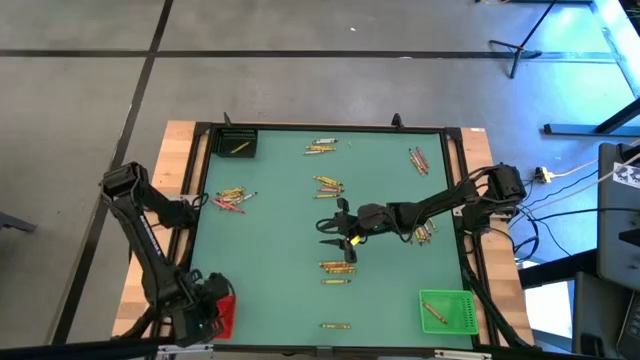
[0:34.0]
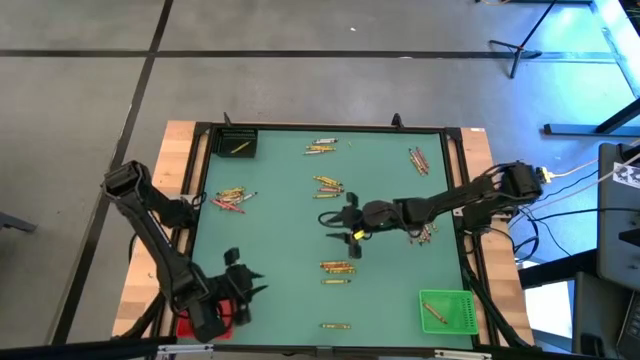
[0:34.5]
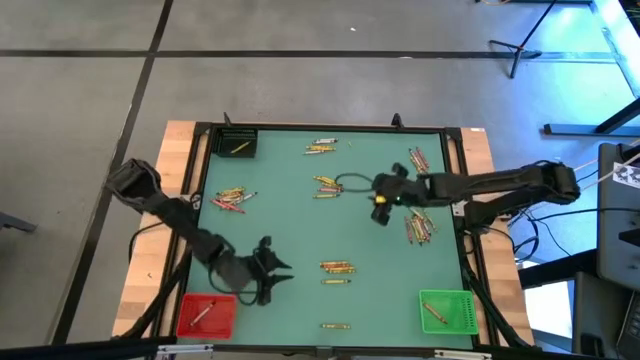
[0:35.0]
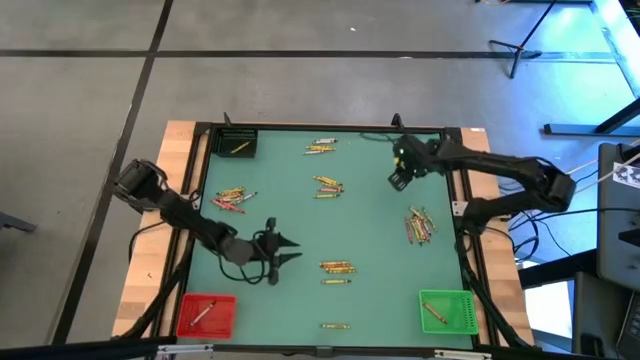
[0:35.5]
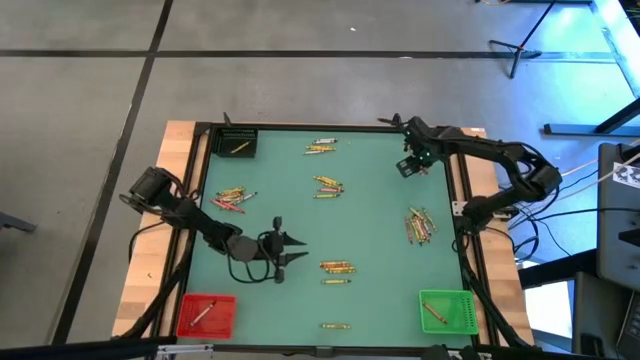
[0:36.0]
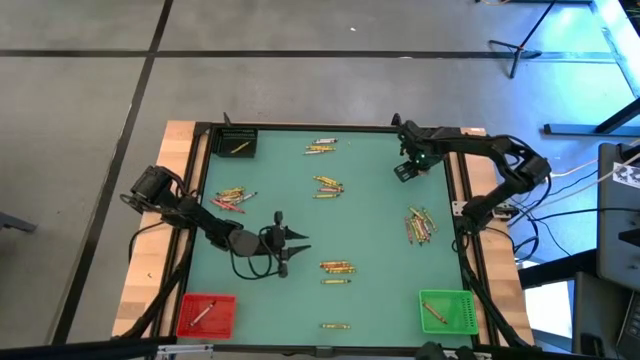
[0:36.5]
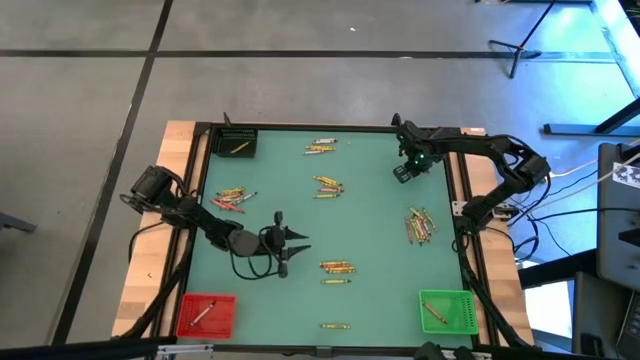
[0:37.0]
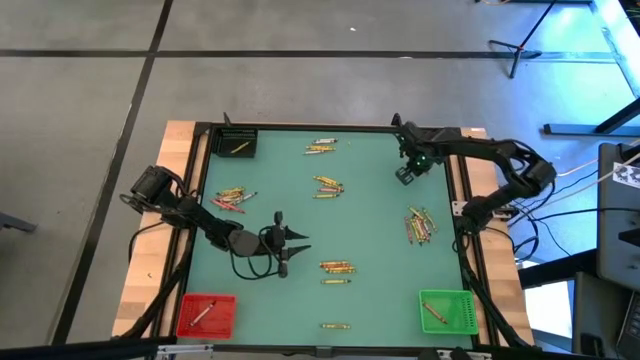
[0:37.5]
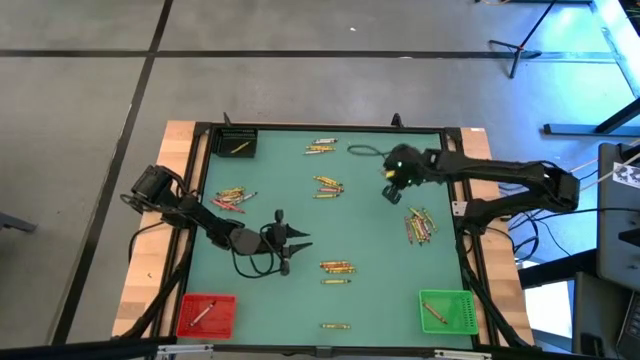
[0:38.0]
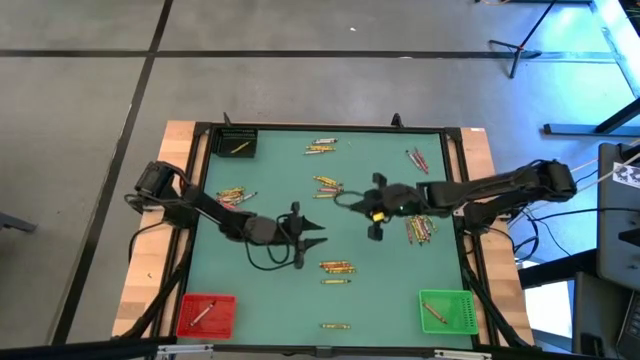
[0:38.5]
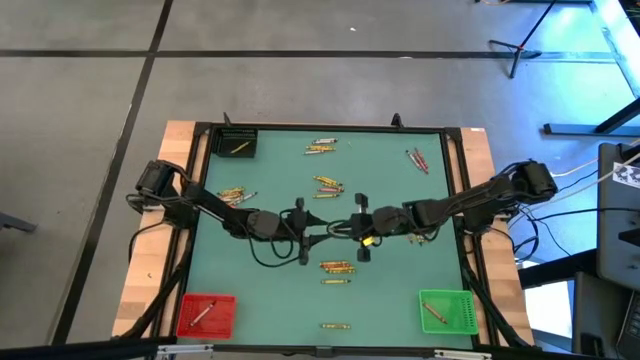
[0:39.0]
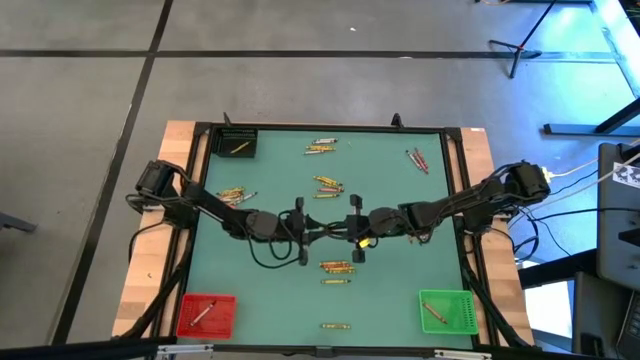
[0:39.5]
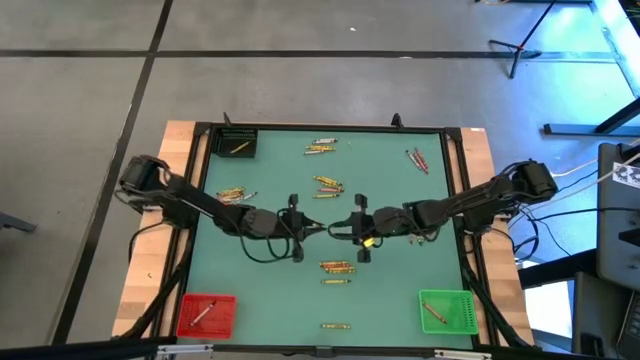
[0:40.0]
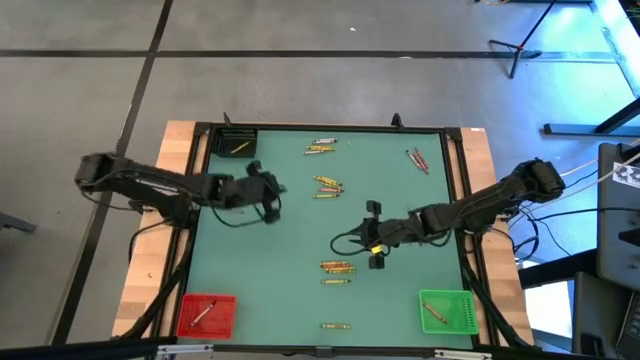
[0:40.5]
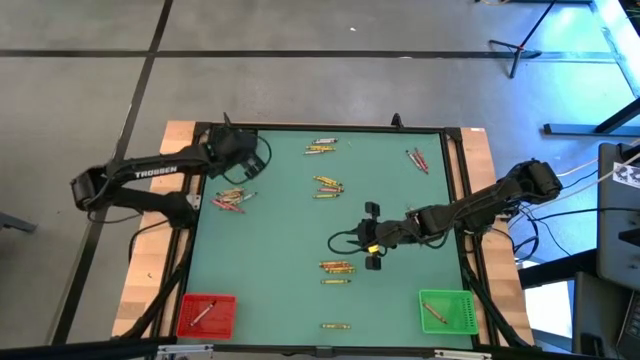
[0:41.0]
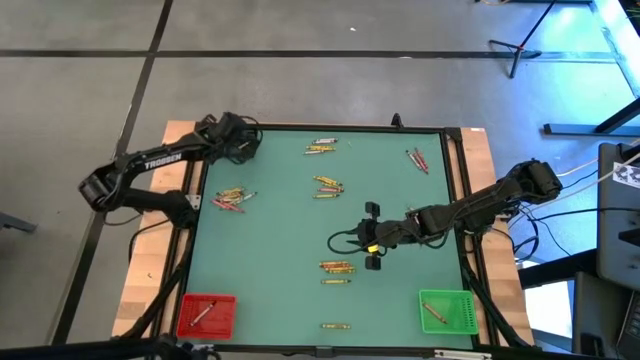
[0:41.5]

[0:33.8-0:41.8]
Task: Sort crayons
Put the yellow crayon into the black bin

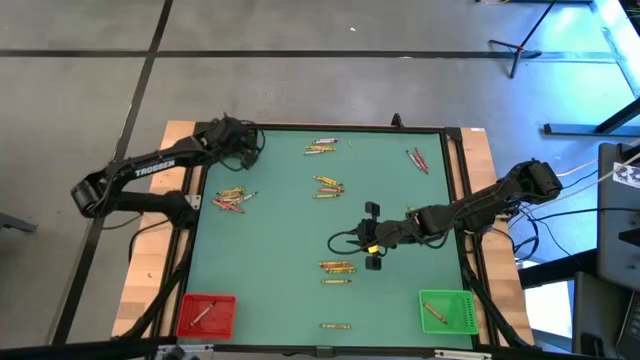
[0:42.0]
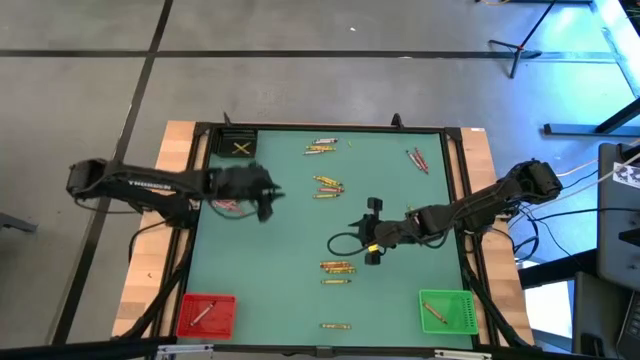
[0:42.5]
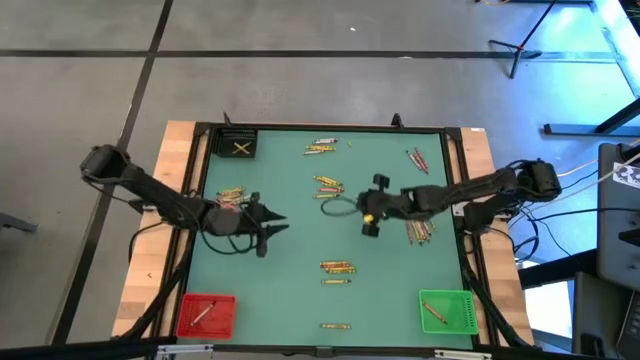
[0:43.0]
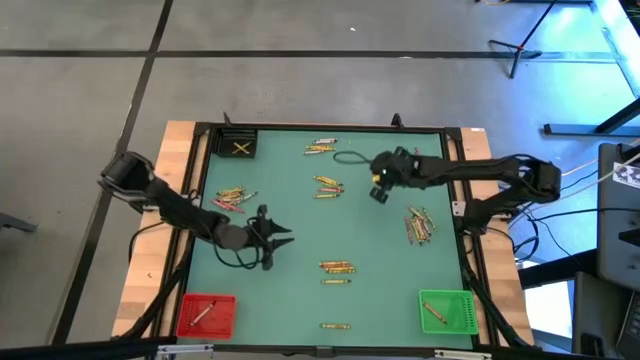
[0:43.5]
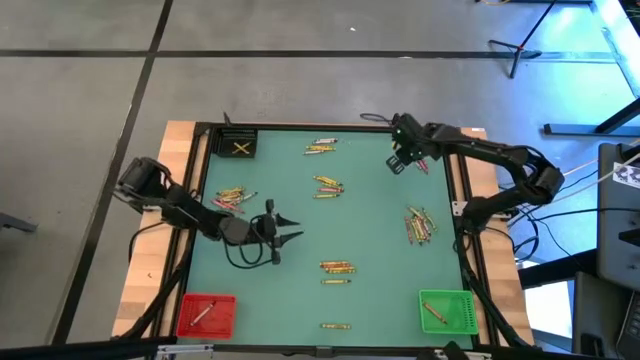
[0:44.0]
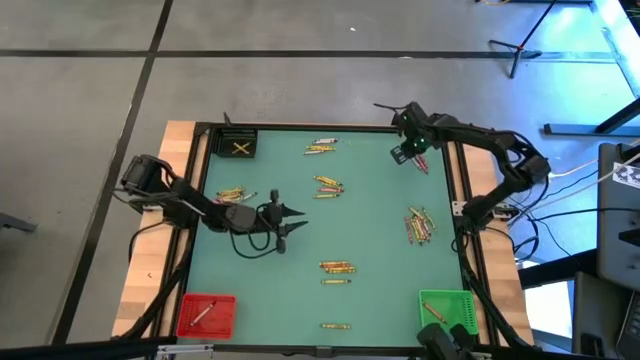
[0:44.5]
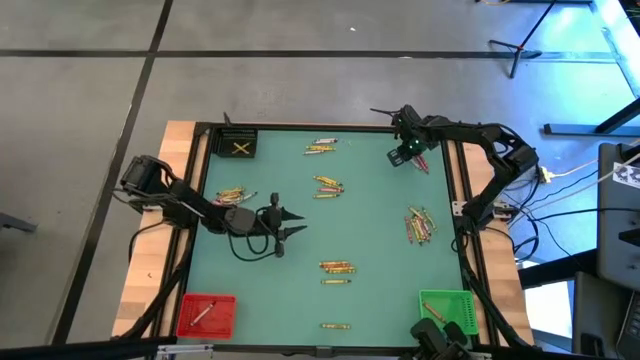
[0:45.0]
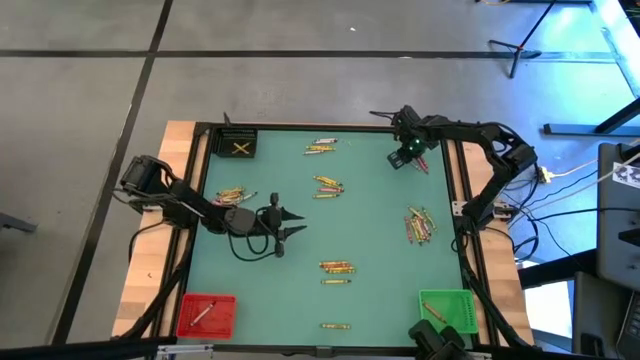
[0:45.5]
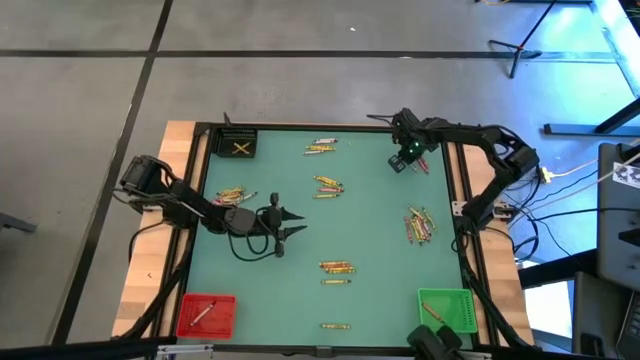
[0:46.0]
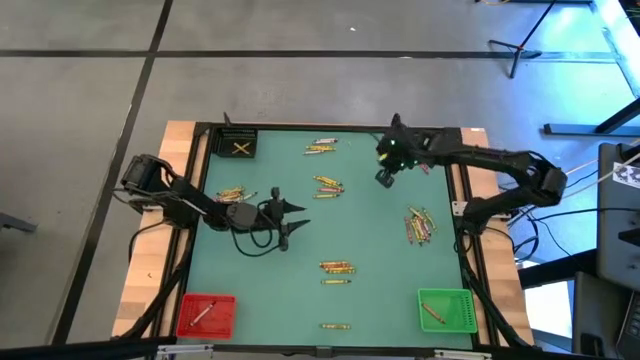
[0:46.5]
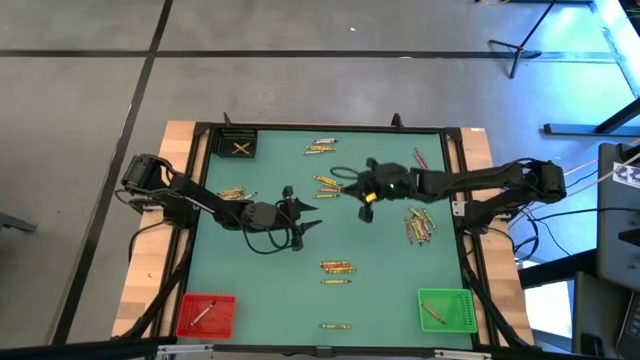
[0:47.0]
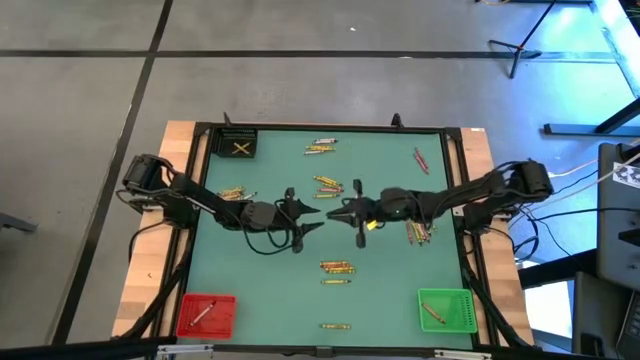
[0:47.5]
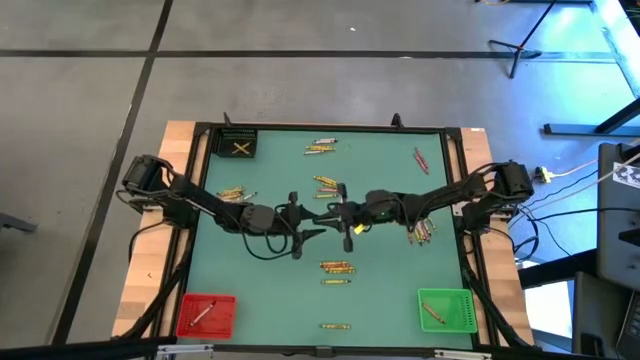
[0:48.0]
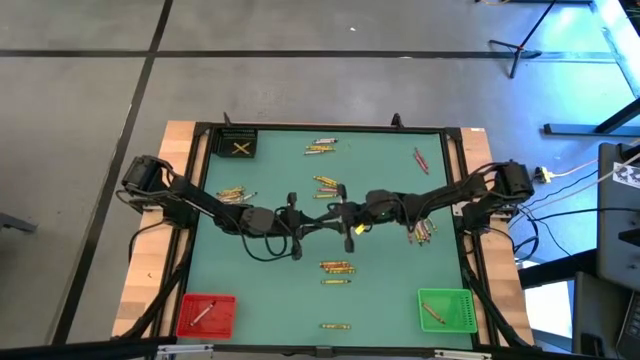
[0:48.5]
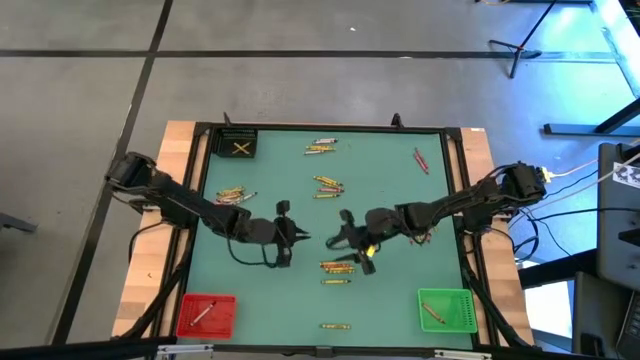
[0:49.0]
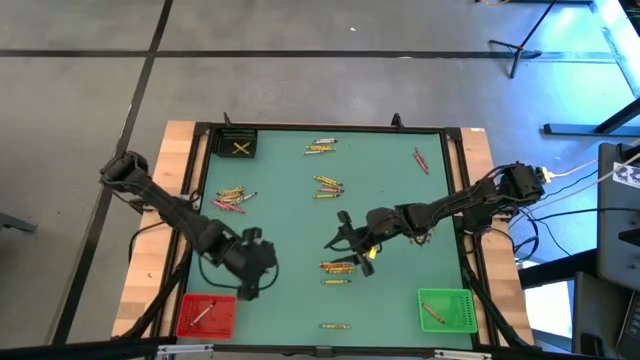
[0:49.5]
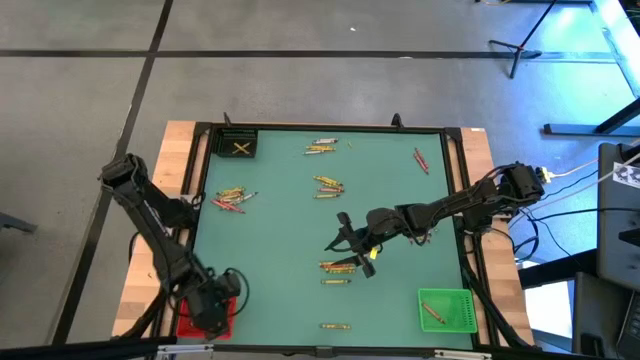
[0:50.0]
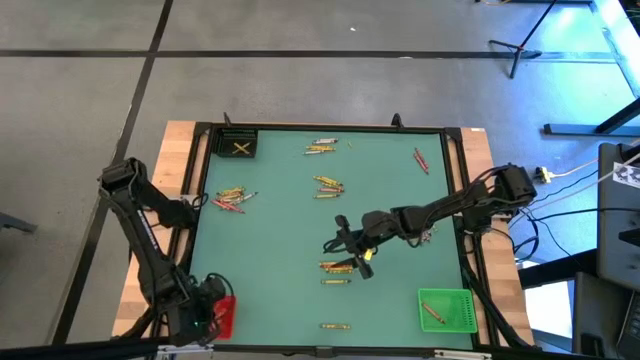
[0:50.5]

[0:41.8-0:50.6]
Put the black crayon into the red bin

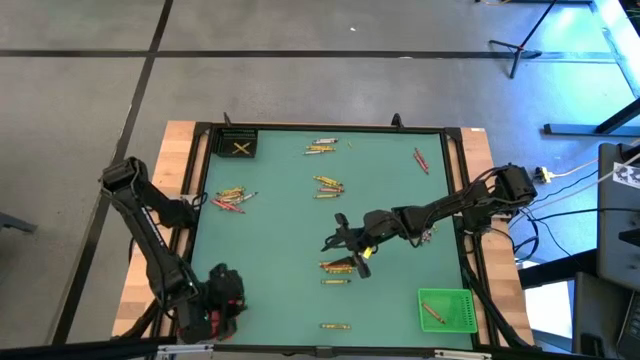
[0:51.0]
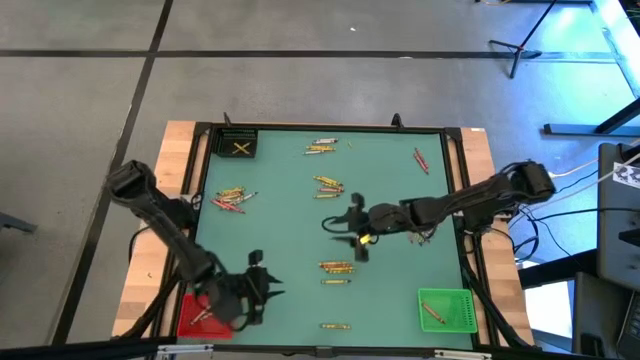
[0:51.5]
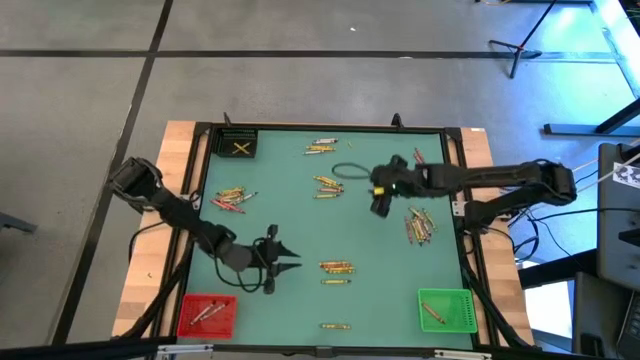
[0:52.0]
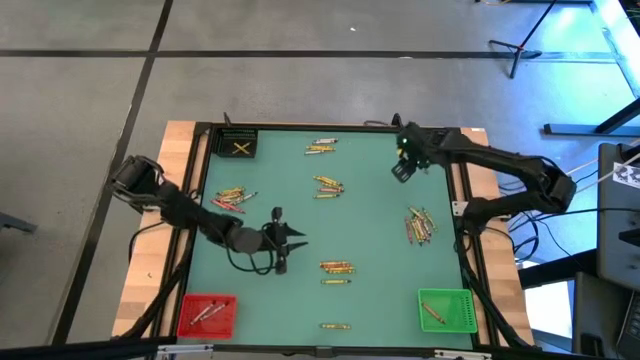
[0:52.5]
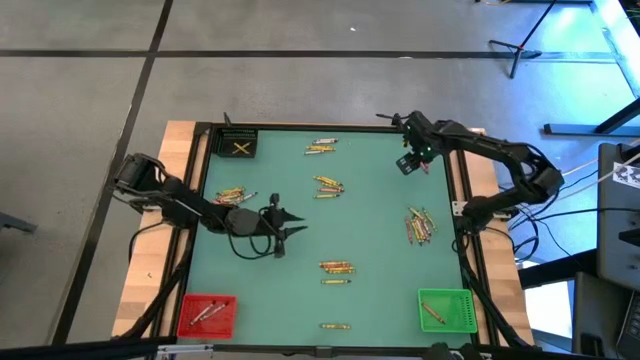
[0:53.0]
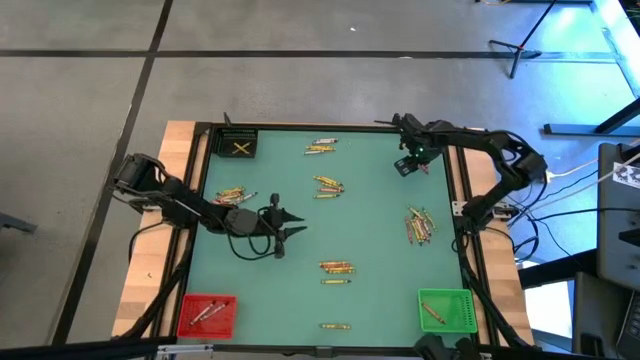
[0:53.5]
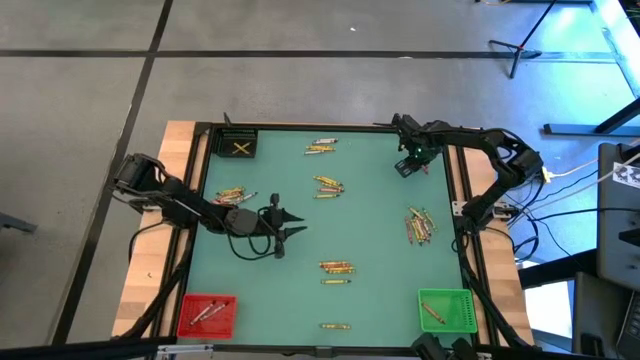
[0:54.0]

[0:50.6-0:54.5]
Put the red crayon into the green bin

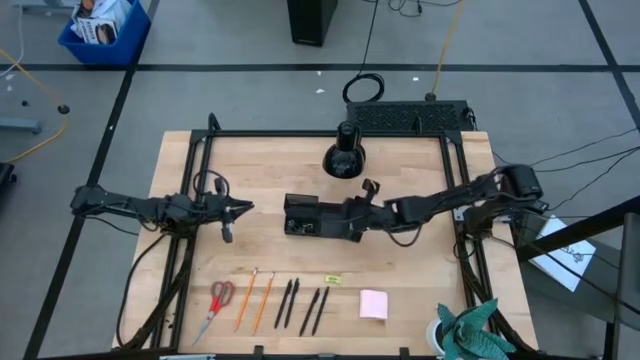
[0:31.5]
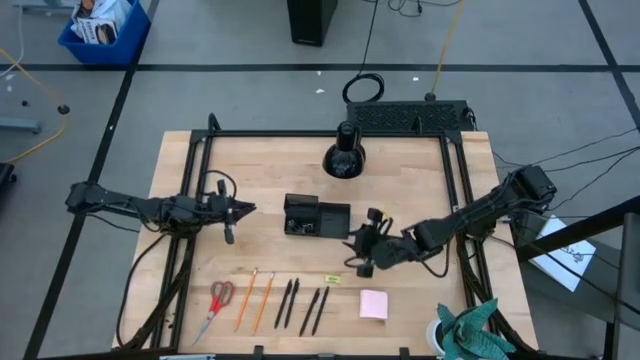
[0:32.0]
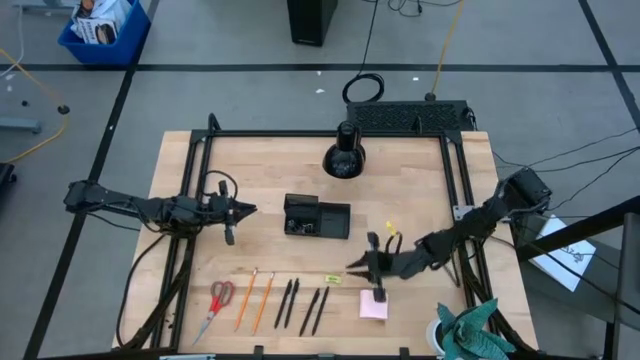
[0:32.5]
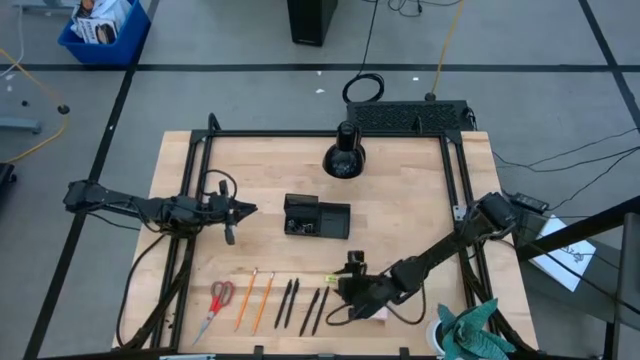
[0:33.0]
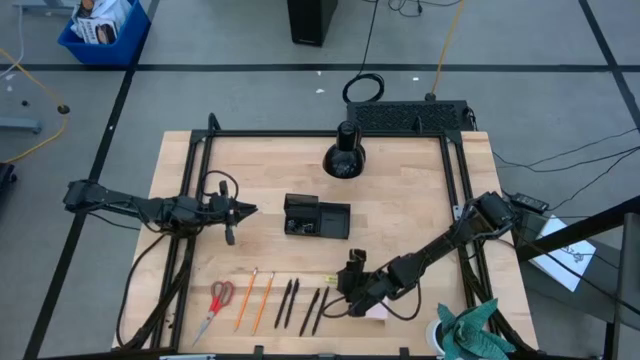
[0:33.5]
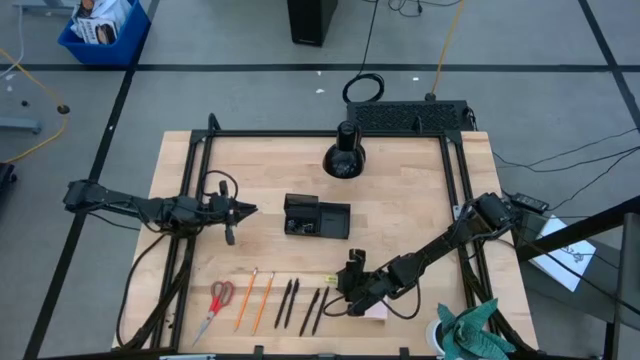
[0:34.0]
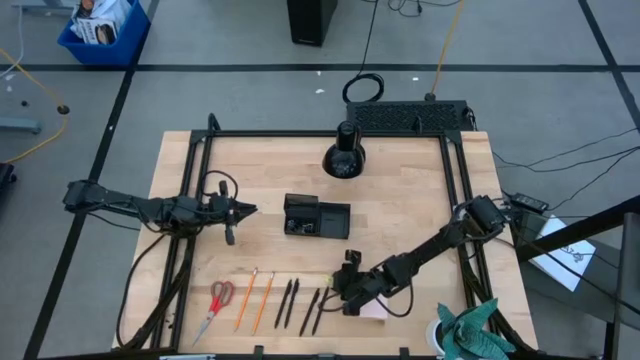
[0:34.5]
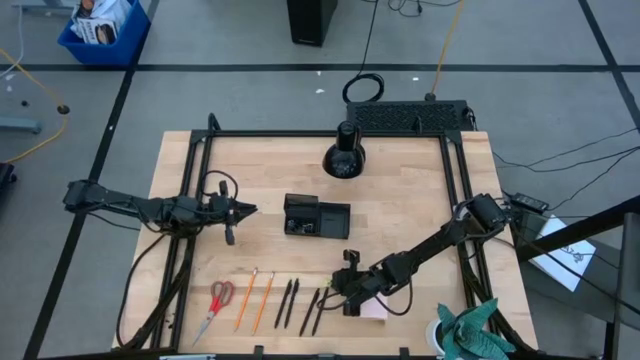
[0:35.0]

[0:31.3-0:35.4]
Task: Pick and place office supplies into organizer
Put the eraser into the desk organizer
